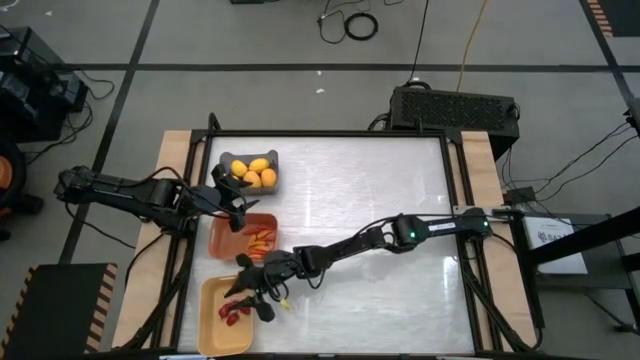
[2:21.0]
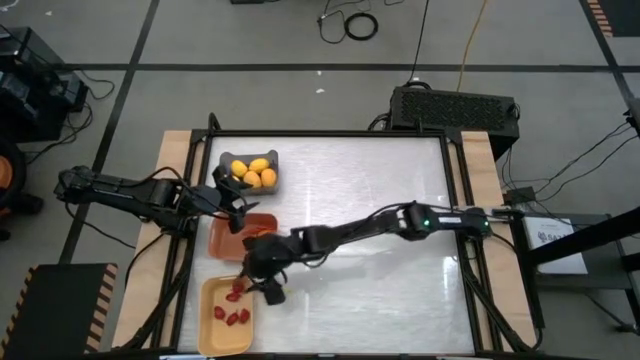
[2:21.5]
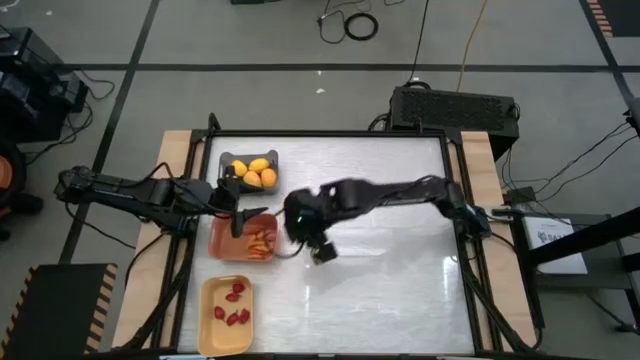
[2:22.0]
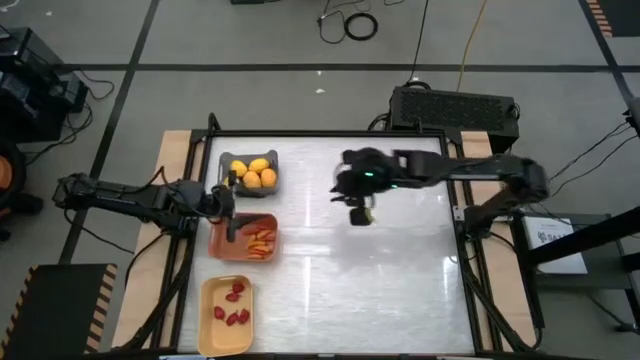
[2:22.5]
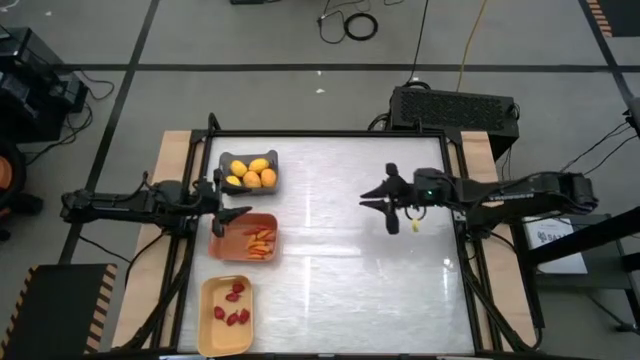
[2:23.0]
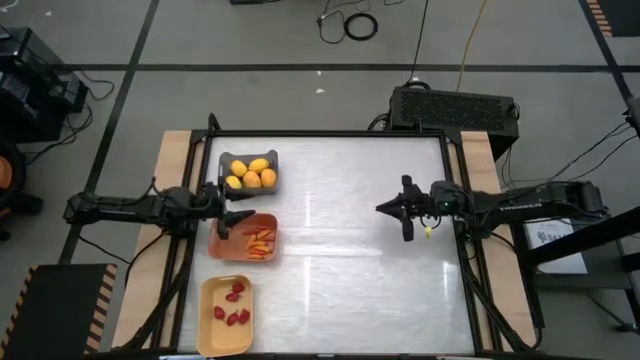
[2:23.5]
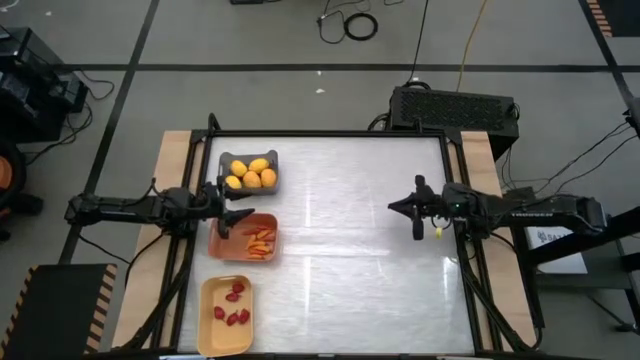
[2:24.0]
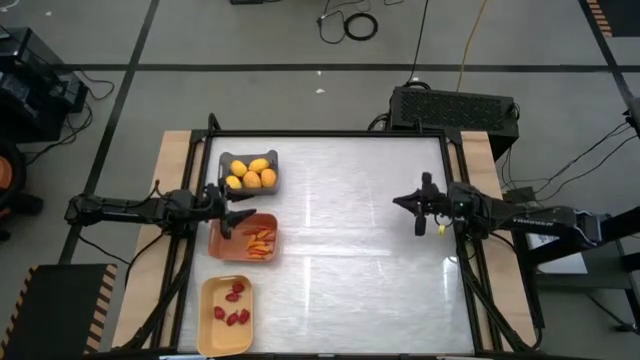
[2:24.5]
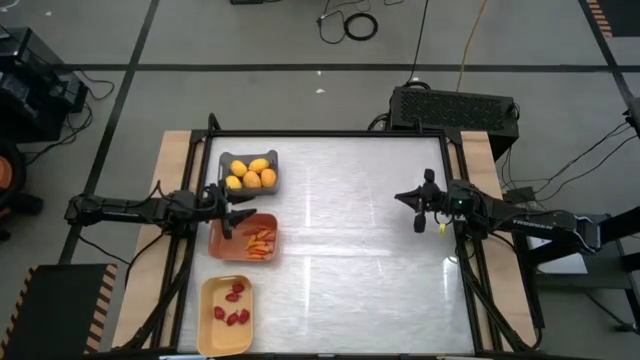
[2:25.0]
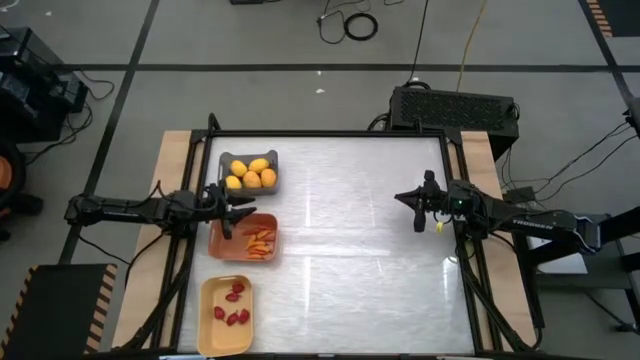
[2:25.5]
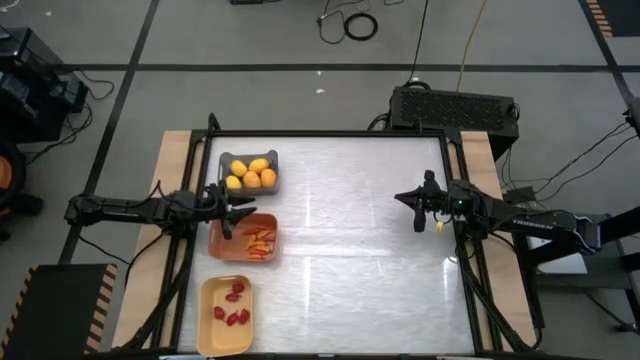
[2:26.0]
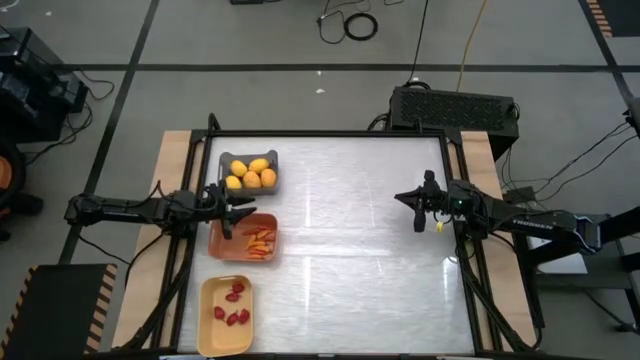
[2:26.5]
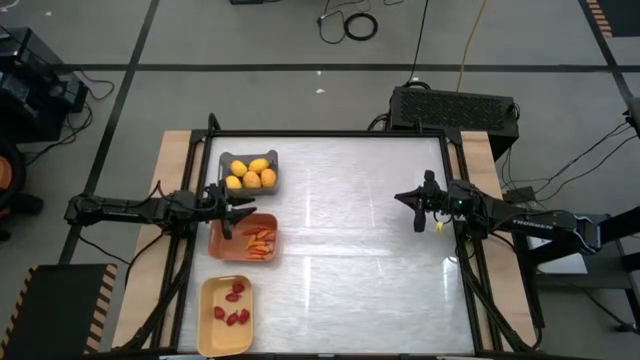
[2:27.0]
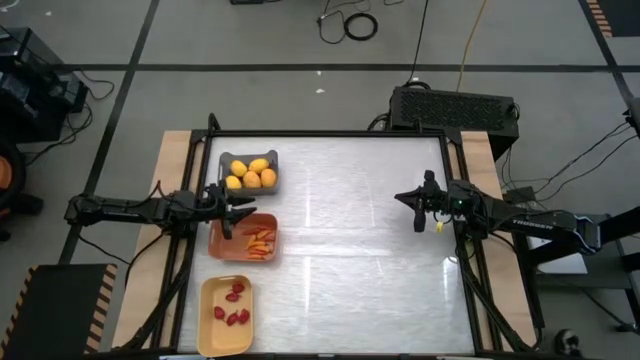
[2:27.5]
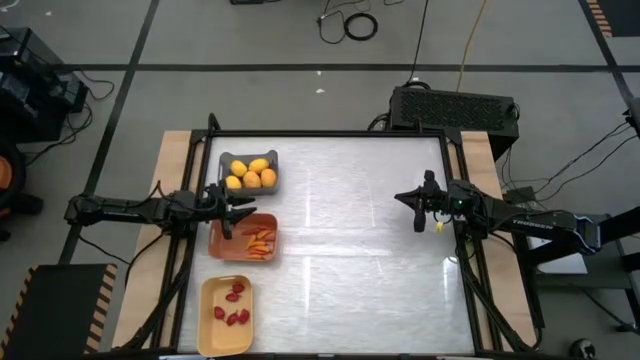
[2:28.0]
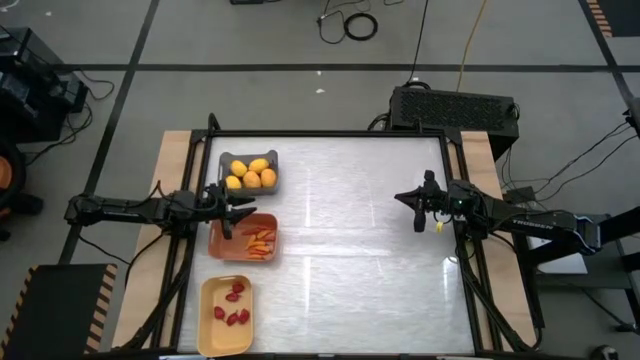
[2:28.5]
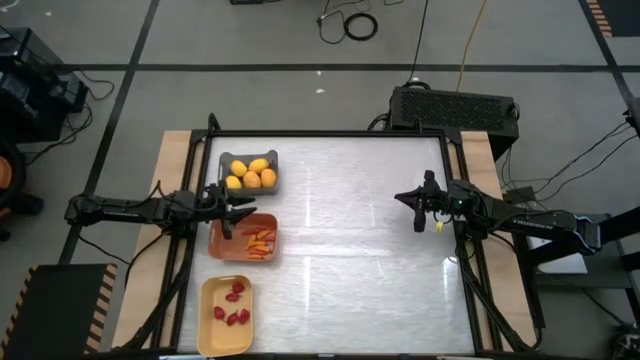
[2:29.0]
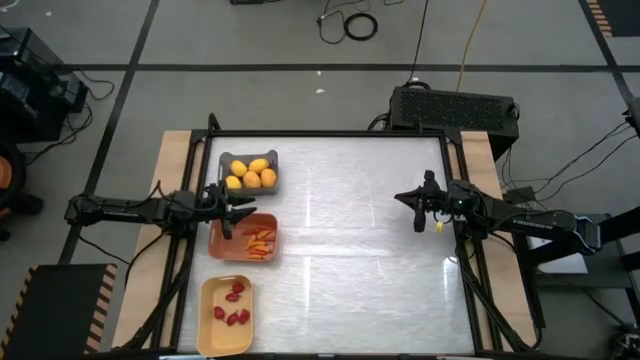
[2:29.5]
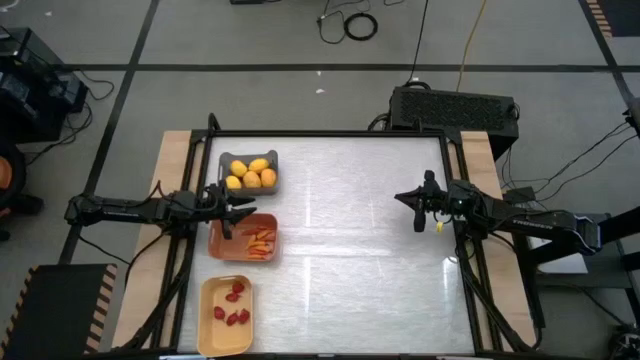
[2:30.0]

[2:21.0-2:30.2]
Task: Sort produce into baskets
Return to Home Position

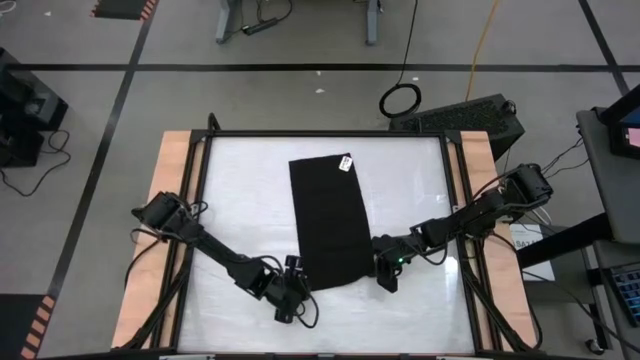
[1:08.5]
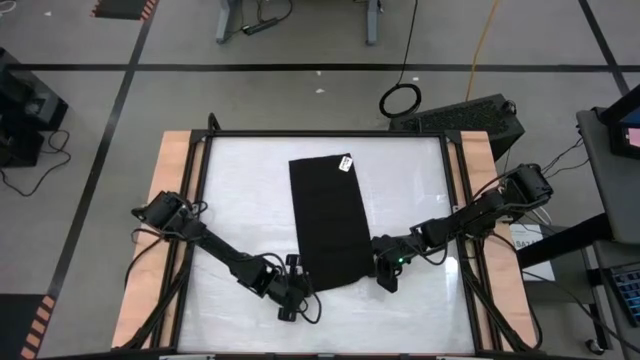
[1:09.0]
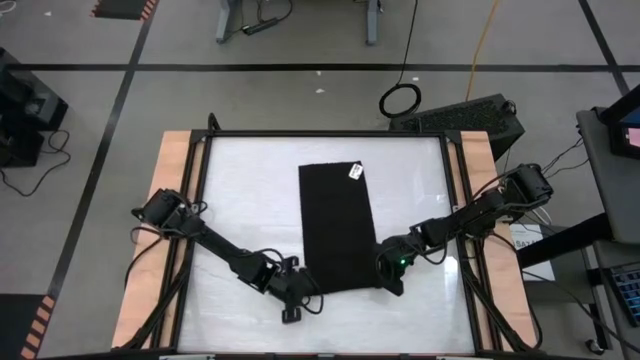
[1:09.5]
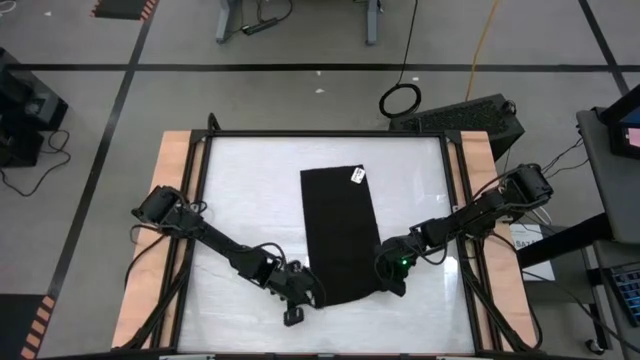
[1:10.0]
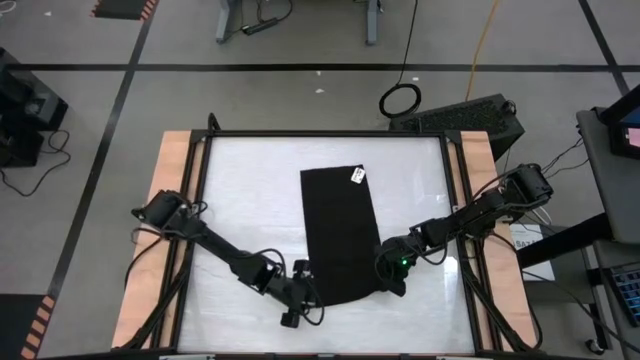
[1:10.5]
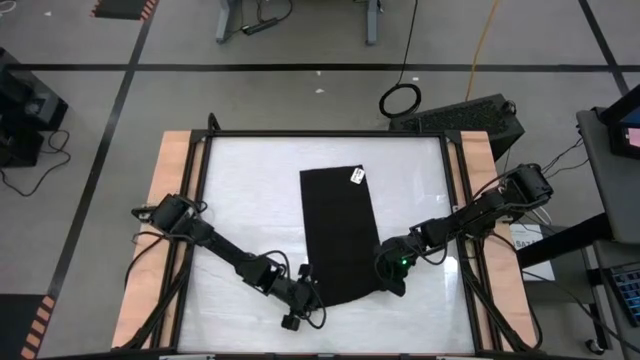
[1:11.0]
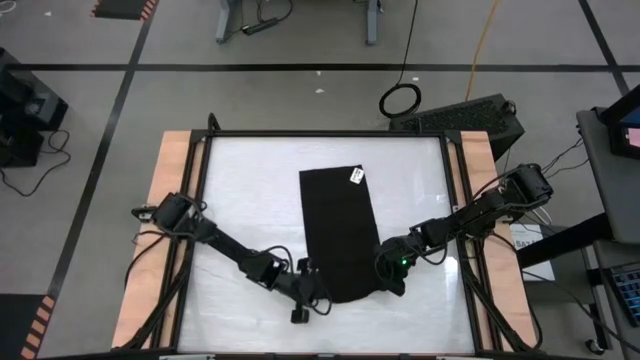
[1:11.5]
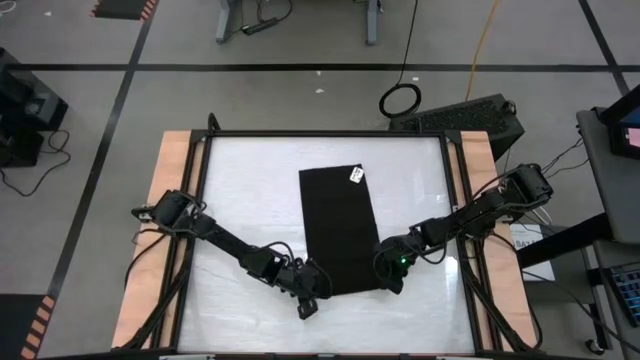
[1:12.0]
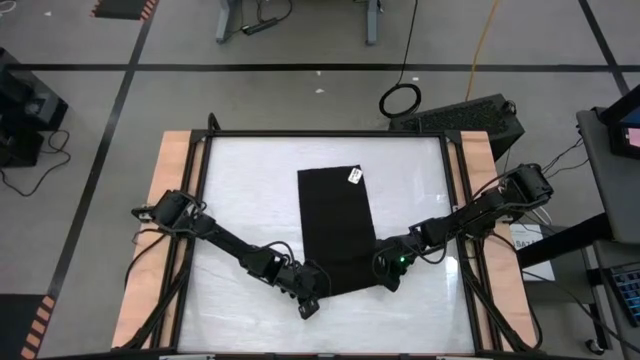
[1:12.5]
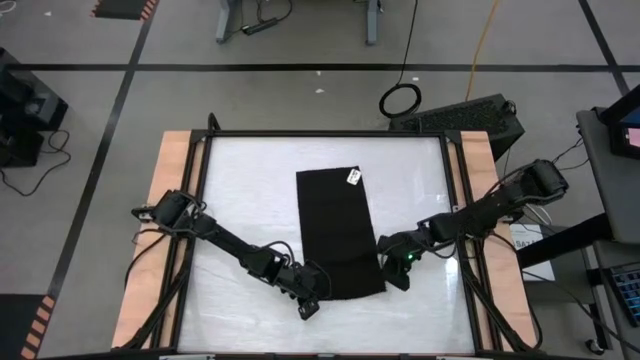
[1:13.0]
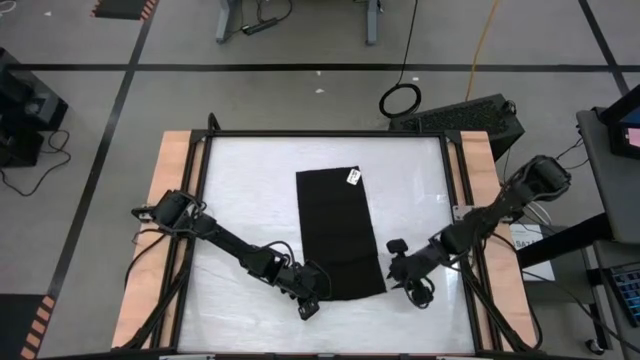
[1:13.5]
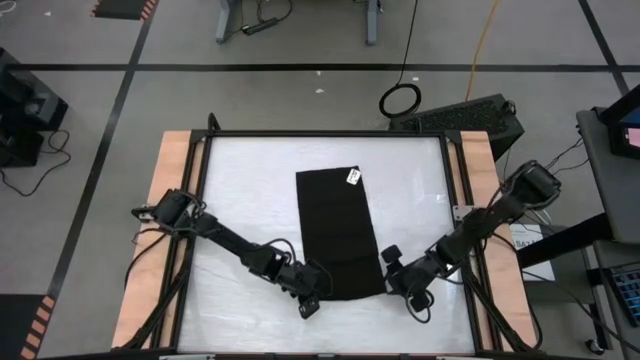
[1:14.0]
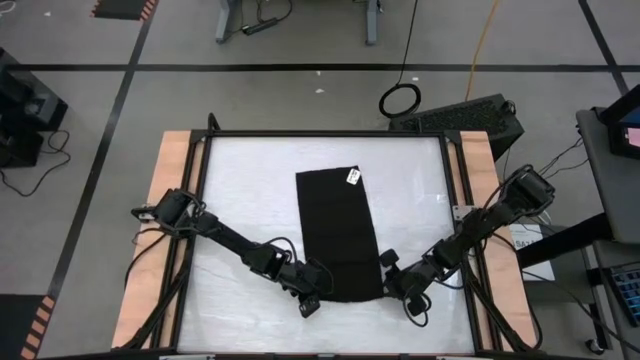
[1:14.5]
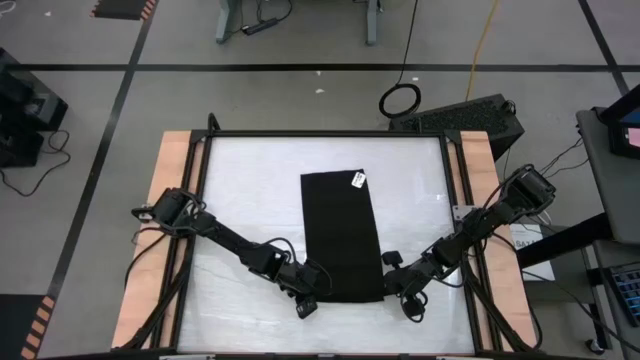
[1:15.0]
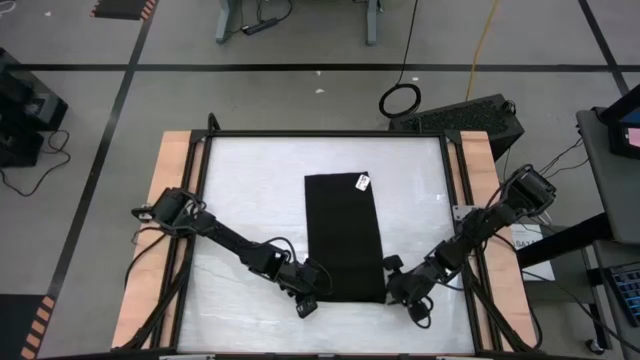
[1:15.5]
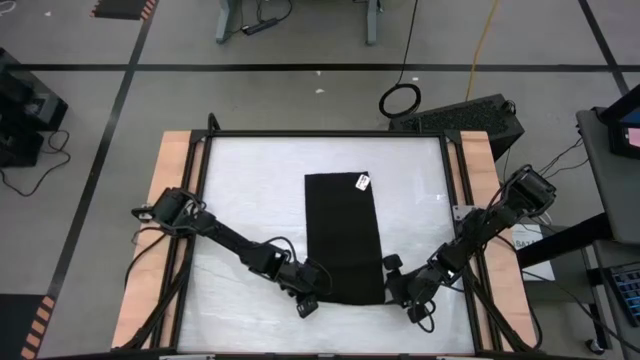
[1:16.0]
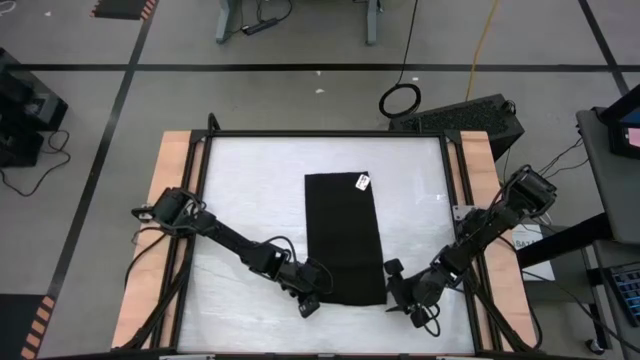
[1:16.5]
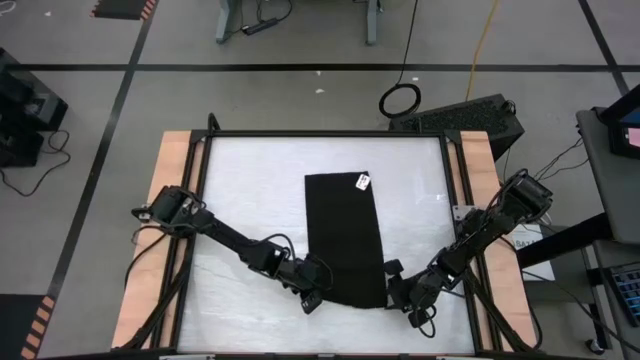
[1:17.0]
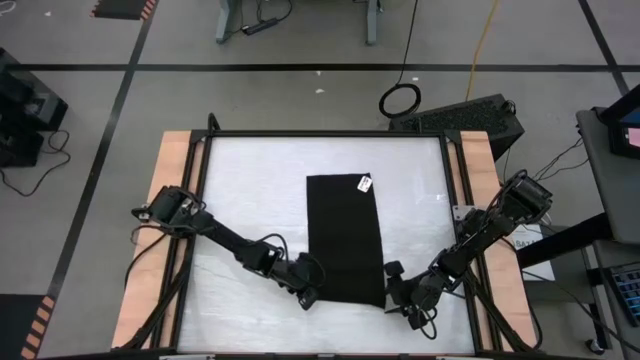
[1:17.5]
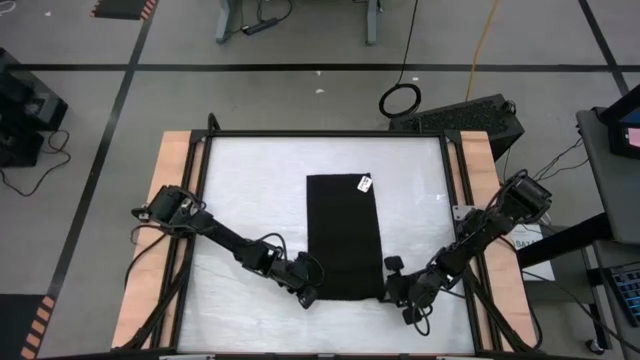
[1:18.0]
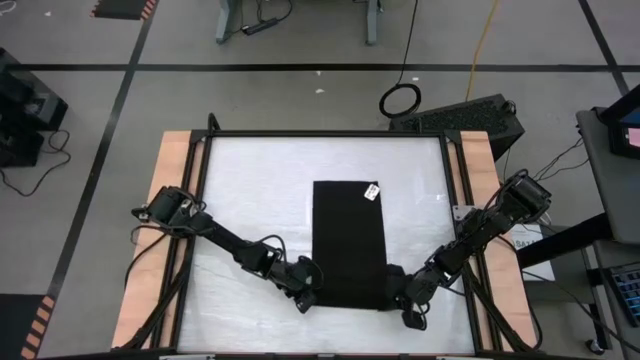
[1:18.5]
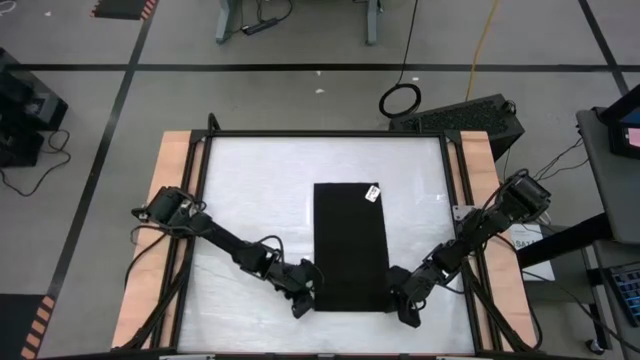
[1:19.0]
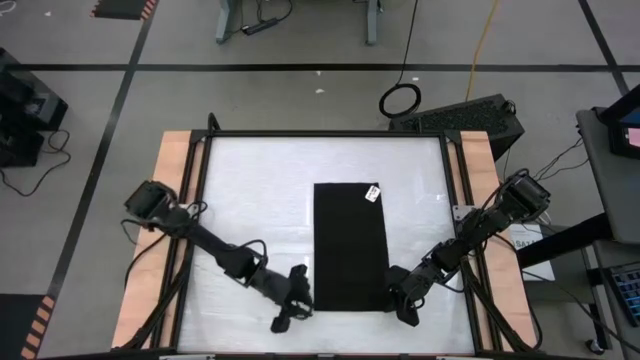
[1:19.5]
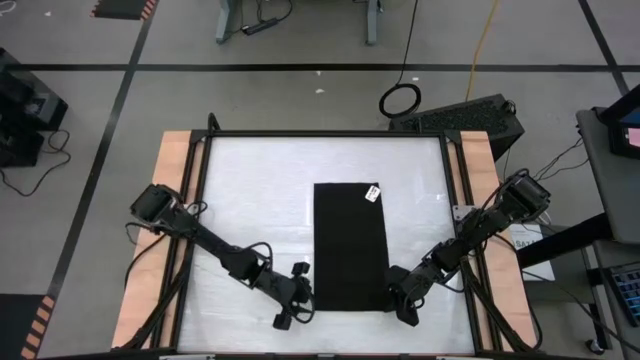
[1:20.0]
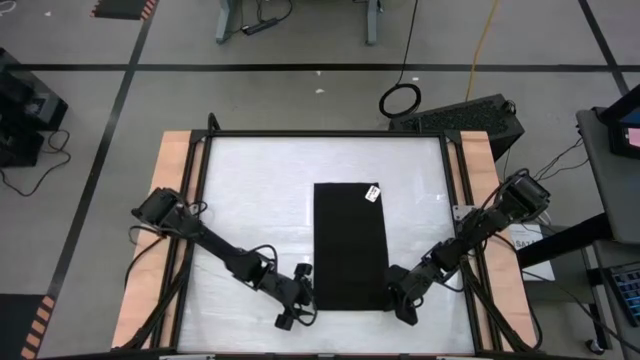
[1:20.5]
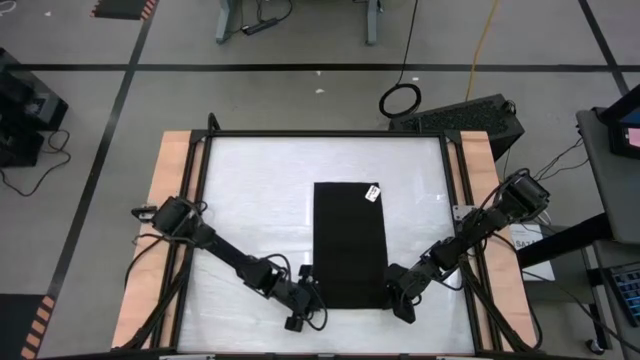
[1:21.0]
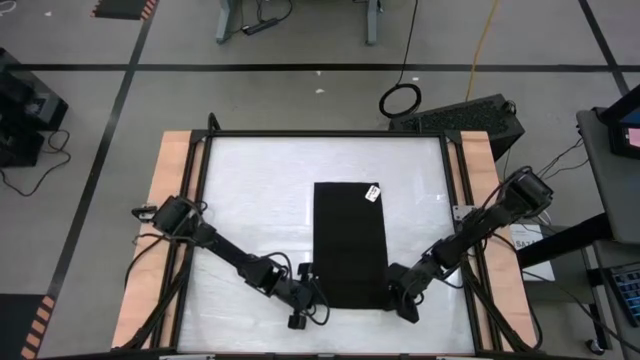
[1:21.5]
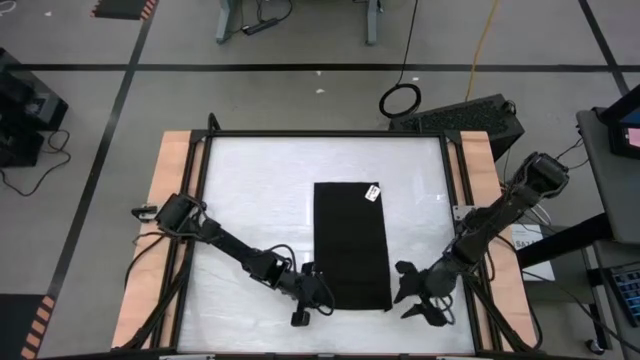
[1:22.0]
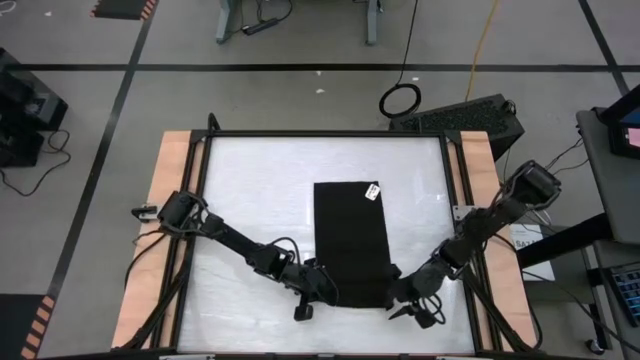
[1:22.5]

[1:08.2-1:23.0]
Task: Roll towel into tight, uniform cylinder
Roll the black towel
